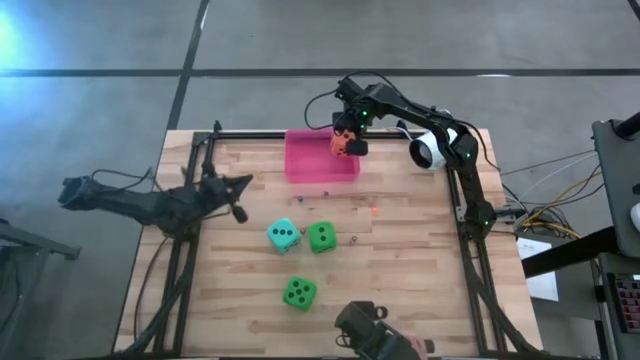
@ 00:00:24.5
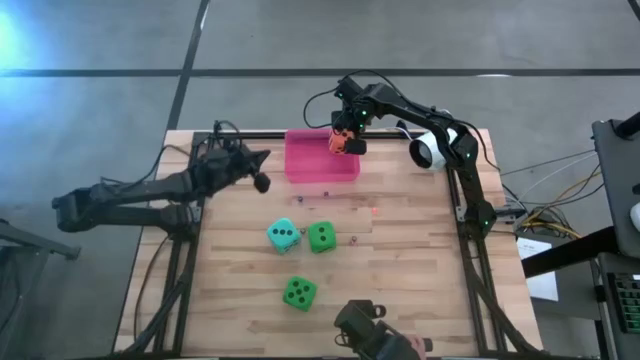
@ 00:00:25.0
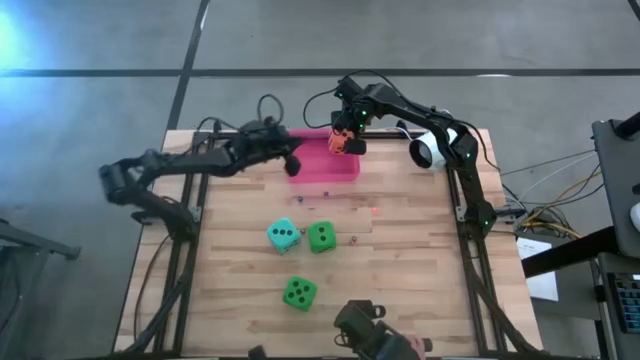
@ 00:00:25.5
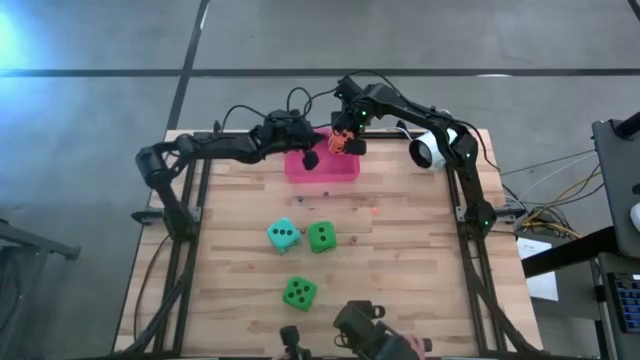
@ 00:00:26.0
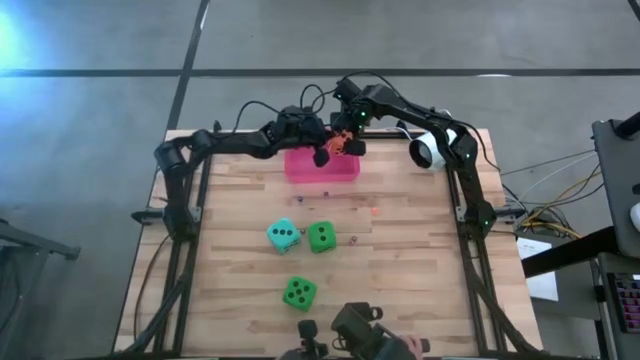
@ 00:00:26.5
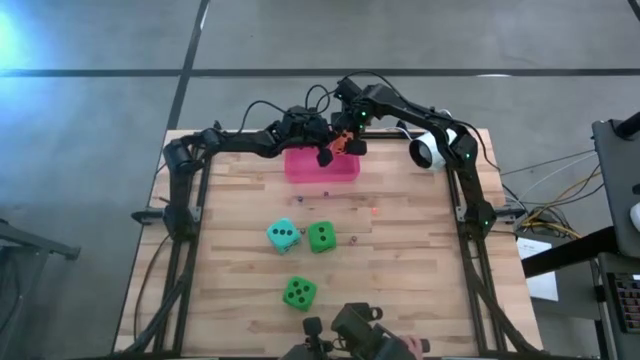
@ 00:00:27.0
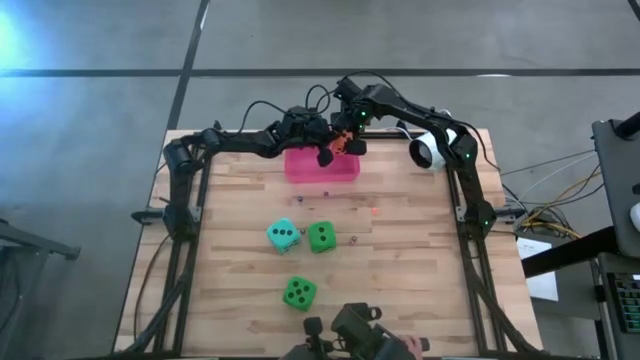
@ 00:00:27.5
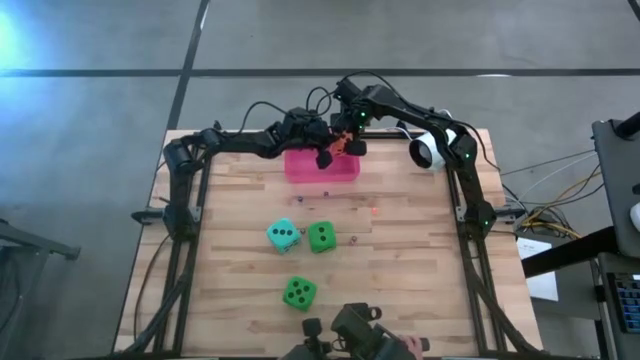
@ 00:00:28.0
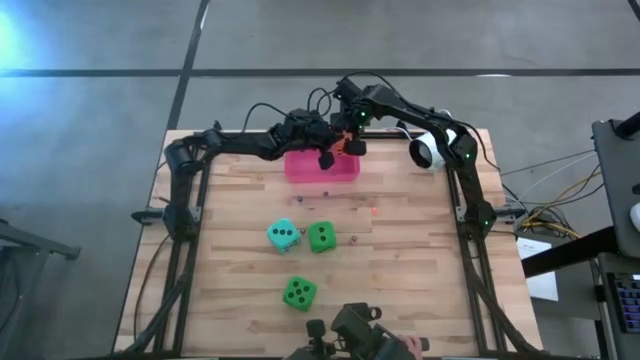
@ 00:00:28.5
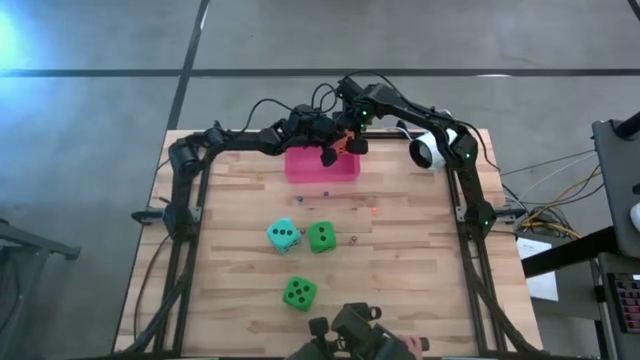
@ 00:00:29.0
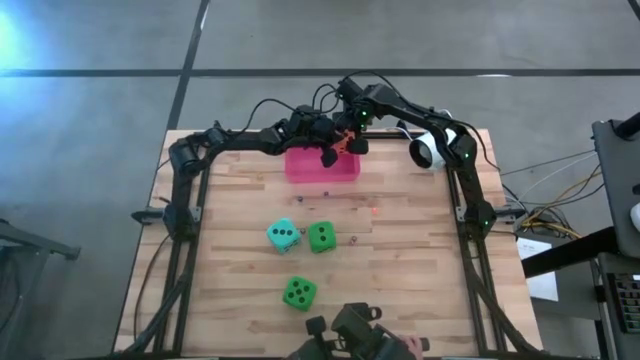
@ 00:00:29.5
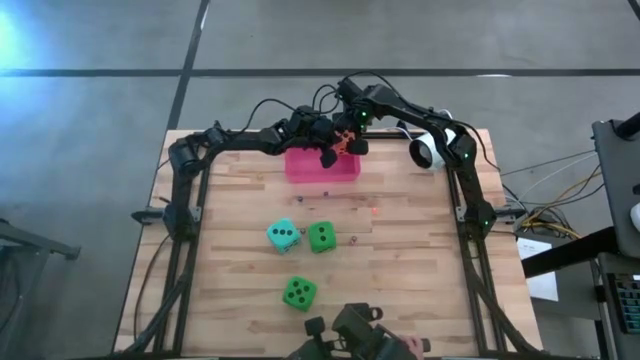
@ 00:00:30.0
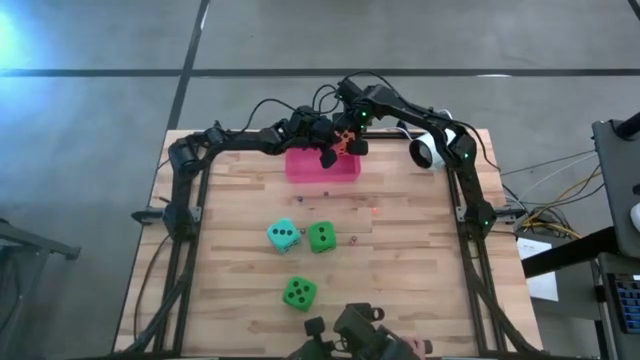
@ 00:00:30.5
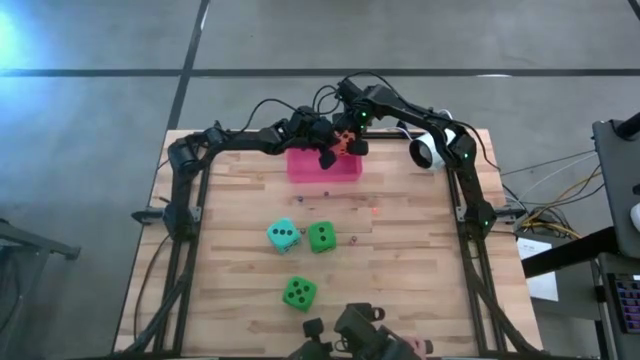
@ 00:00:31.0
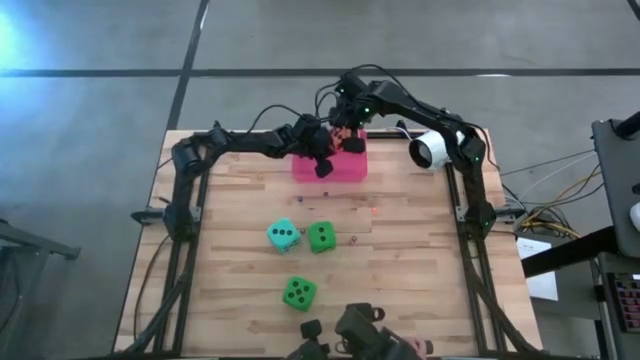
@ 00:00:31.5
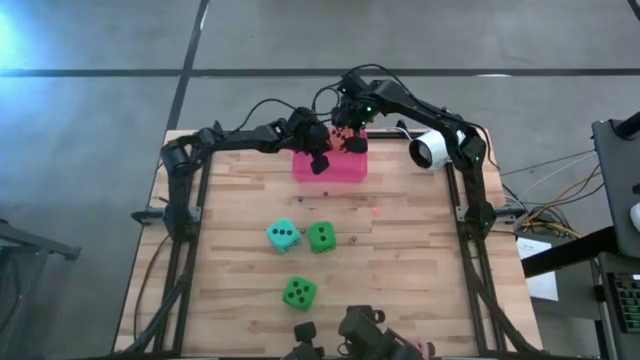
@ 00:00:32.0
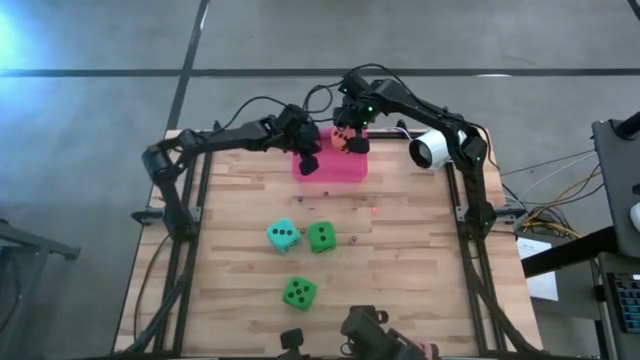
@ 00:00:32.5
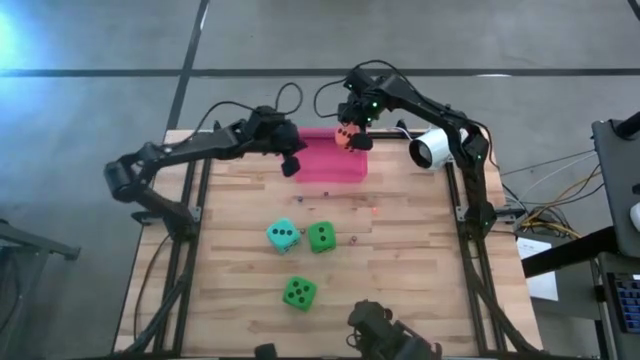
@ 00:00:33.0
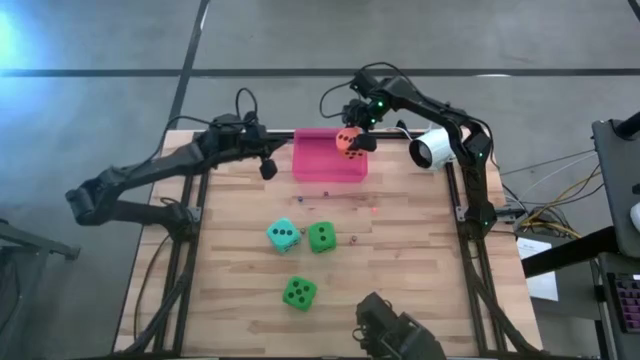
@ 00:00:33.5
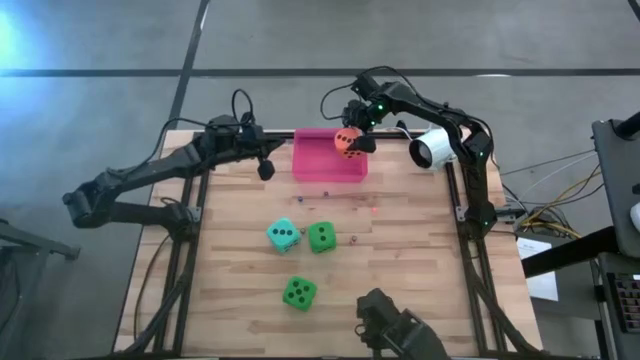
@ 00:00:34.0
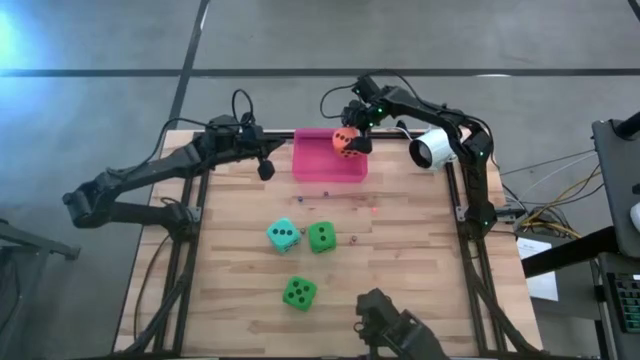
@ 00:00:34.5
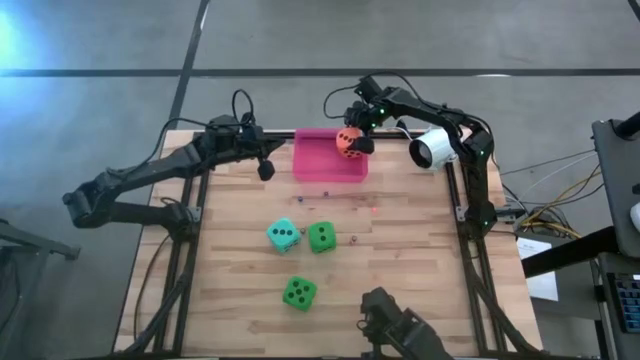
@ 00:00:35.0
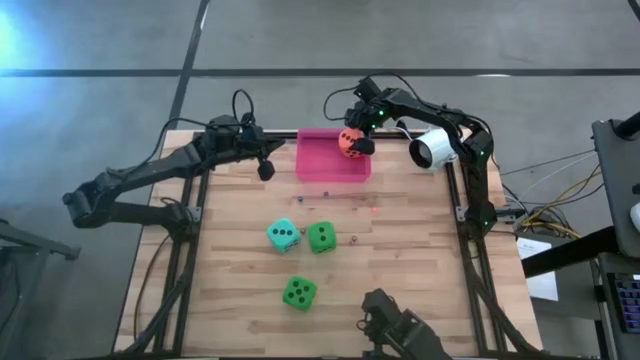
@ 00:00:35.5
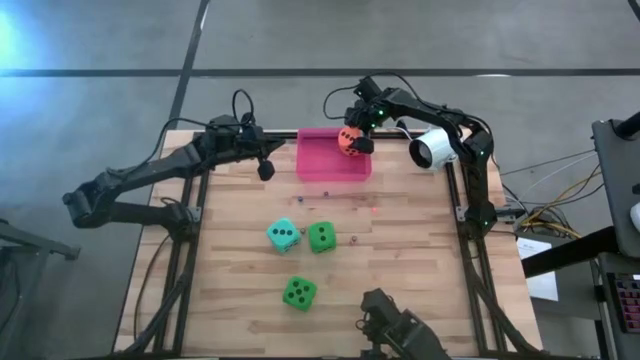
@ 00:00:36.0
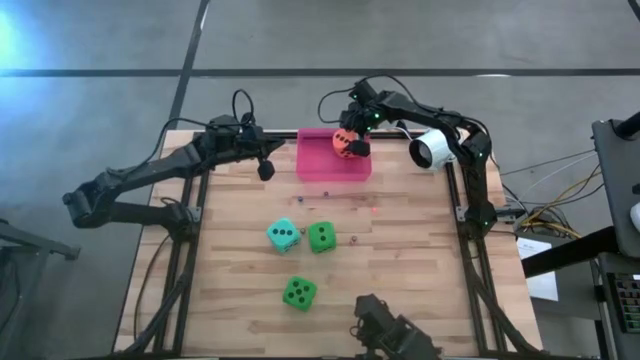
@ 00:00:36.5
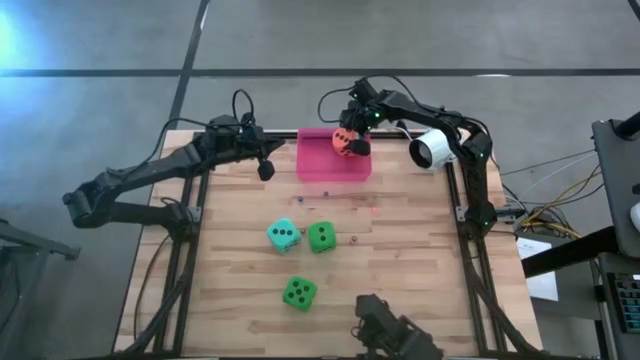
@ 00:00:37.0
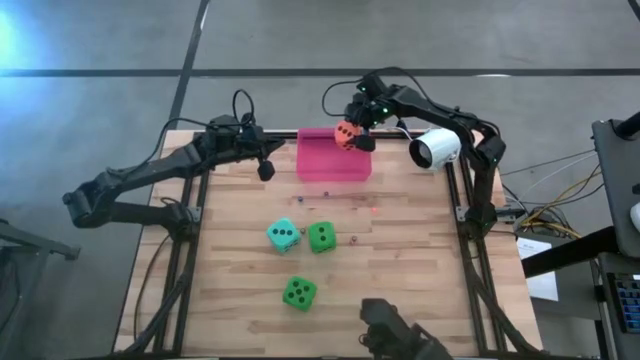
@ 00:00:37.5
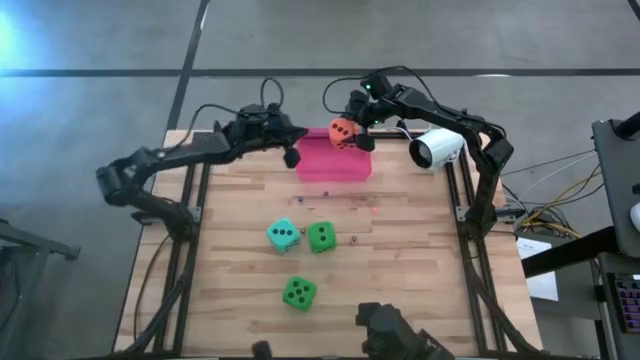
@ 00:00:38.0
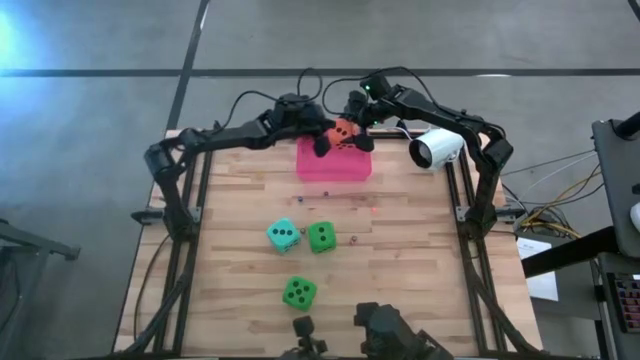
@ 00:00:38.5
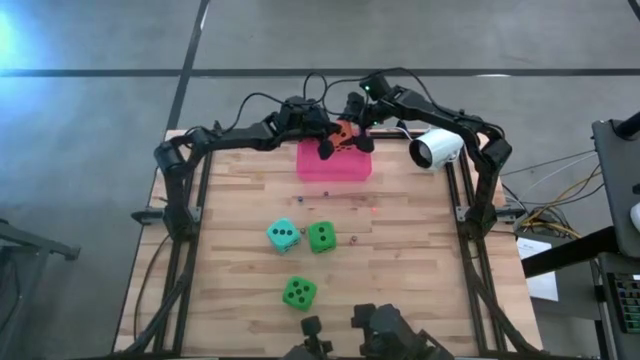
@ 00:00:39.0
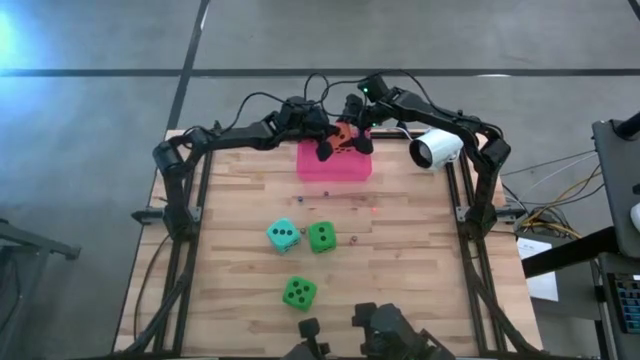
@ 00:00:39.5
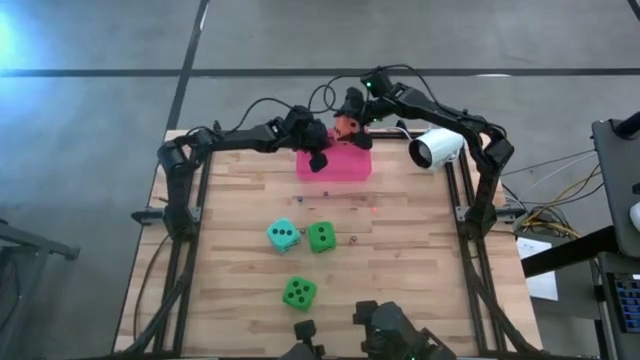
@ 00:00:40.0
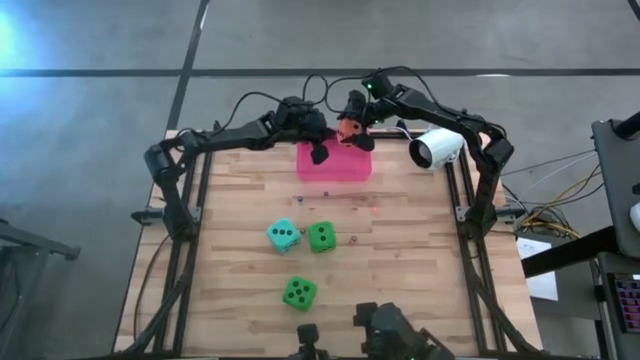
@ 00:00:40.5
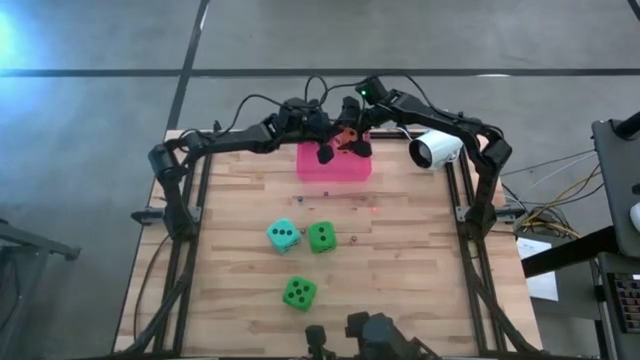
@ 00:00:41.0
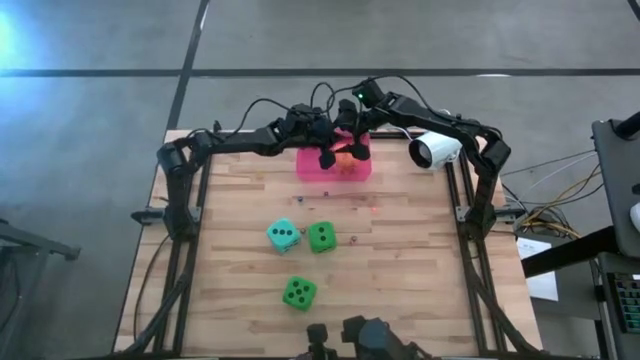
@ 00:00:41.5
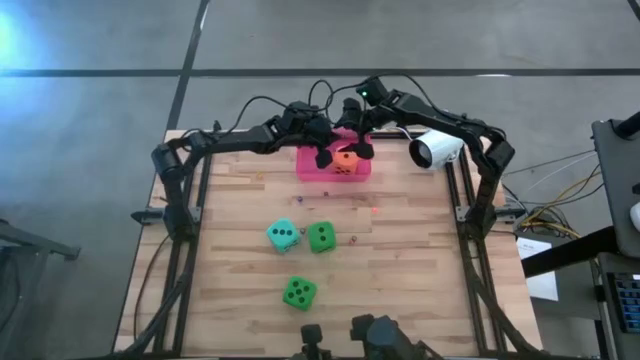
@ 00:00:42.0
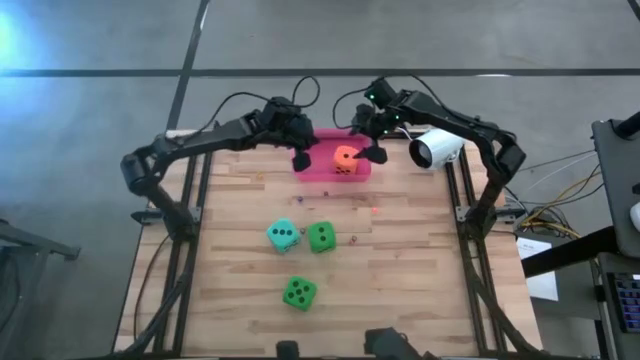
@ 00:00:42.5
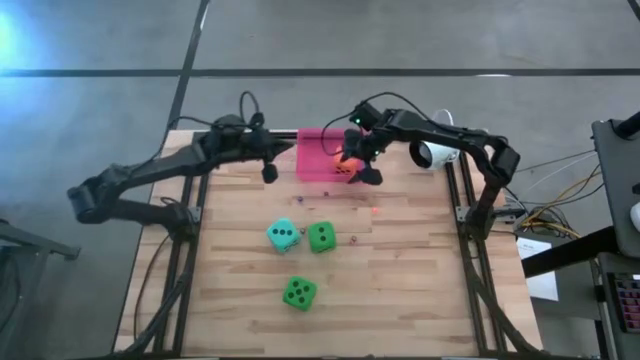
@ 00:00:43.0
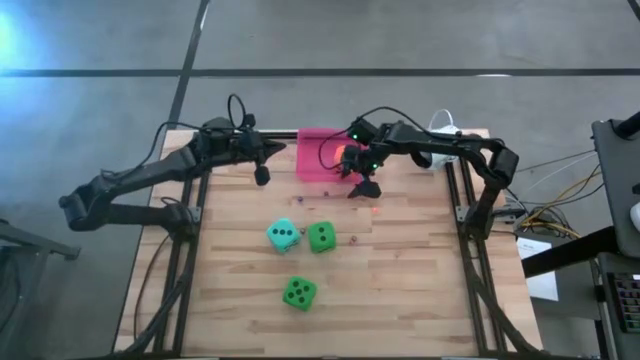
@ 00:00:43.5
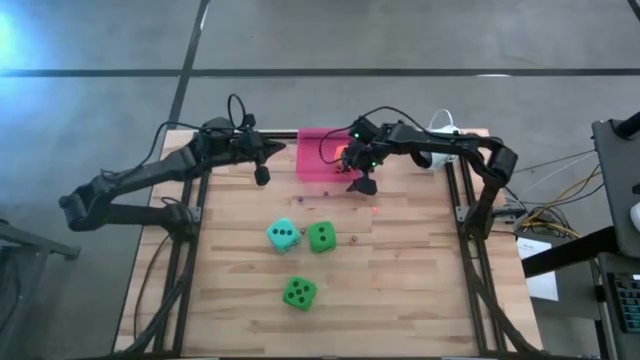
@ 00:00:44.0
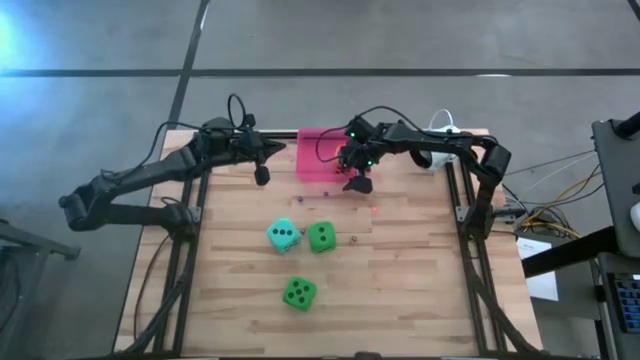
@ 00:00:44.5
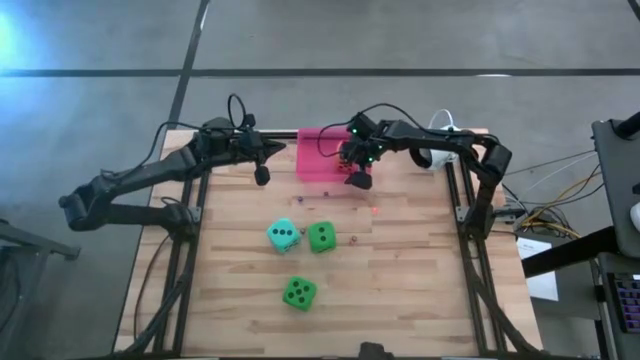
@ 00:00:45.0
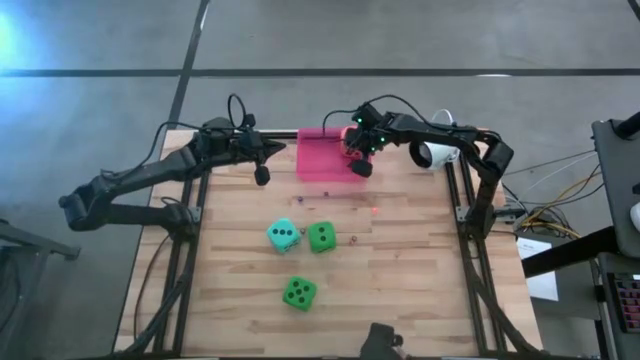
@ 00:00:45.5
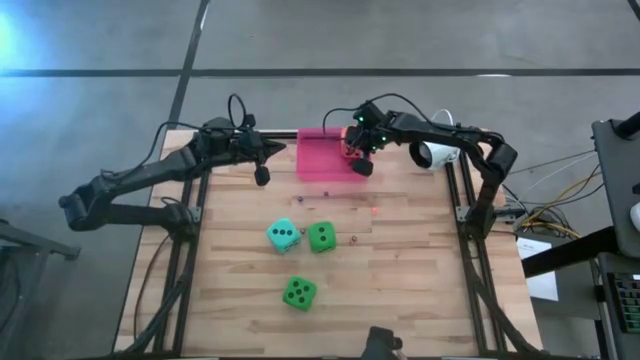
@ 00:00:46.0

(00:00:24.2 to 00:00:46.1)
Task: Pick & Place Dice
Put the large orange dice into the pink bin
